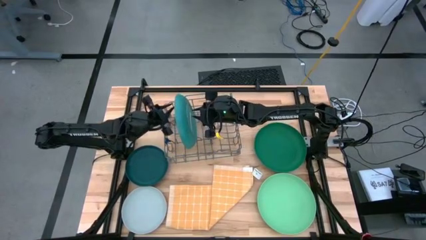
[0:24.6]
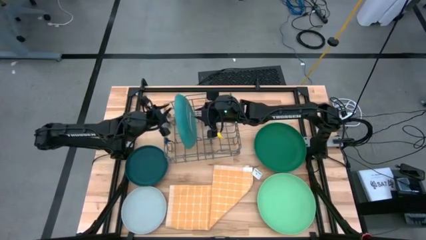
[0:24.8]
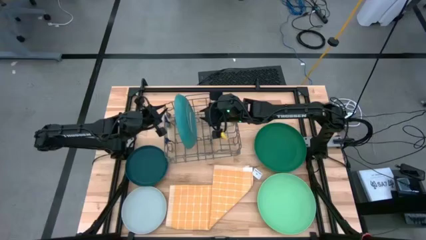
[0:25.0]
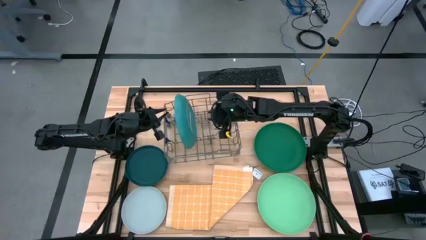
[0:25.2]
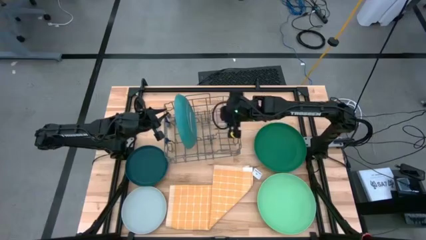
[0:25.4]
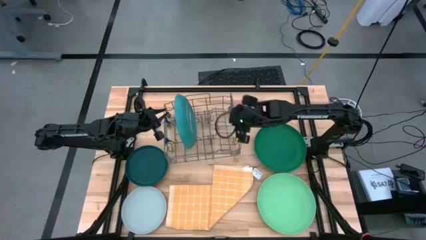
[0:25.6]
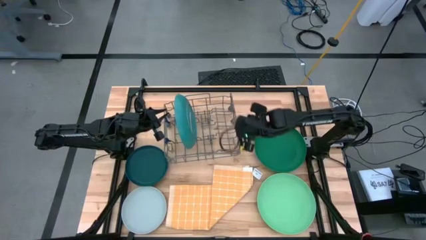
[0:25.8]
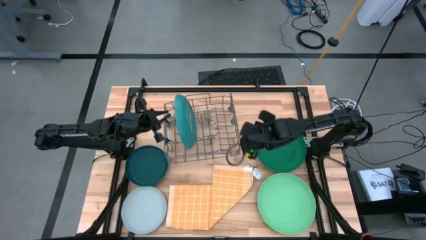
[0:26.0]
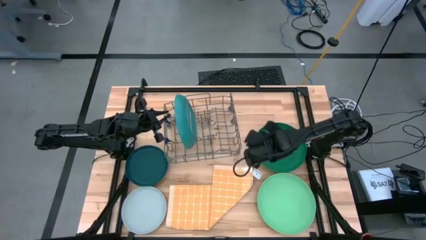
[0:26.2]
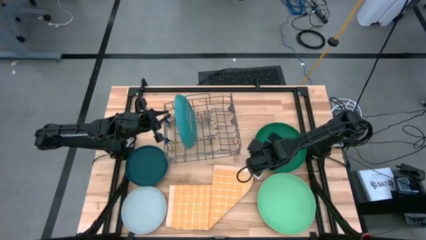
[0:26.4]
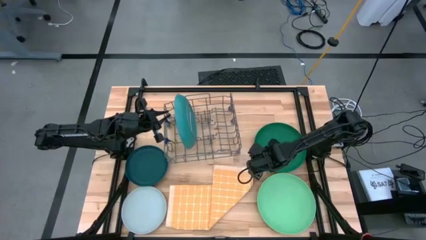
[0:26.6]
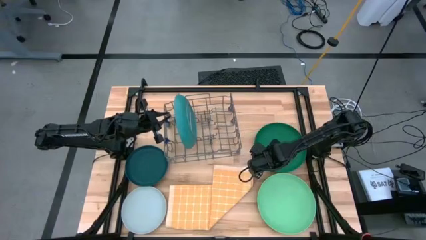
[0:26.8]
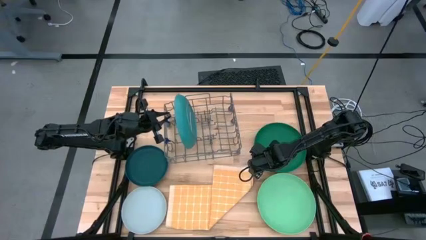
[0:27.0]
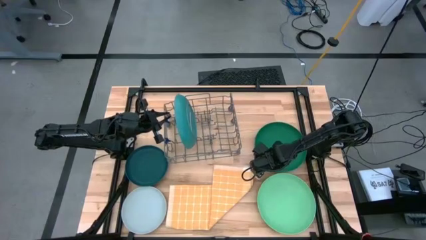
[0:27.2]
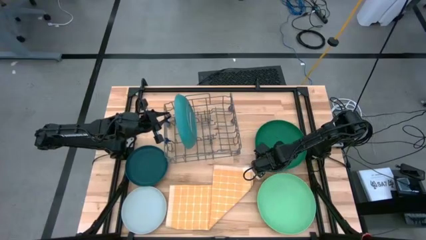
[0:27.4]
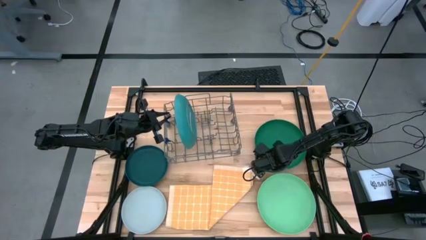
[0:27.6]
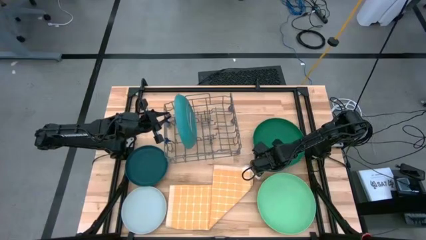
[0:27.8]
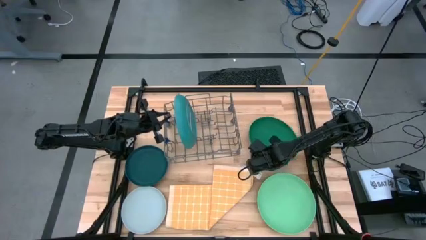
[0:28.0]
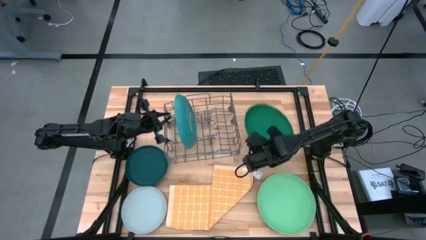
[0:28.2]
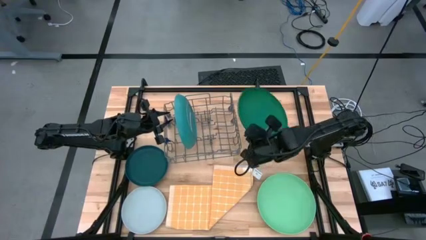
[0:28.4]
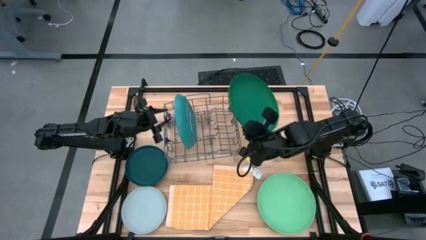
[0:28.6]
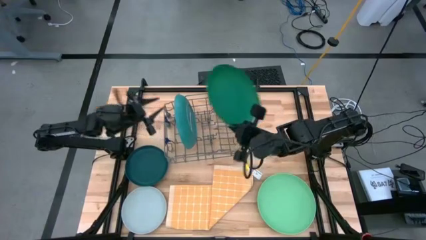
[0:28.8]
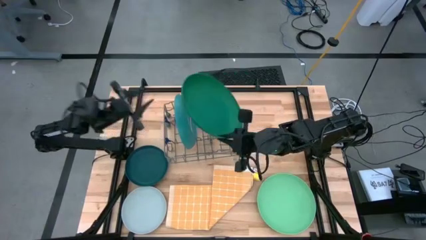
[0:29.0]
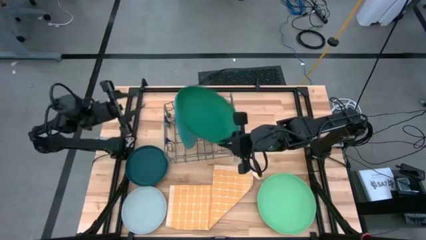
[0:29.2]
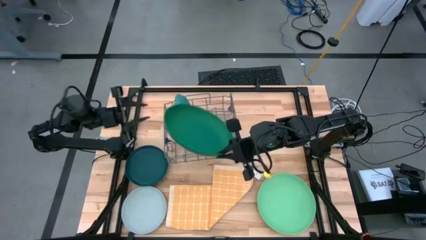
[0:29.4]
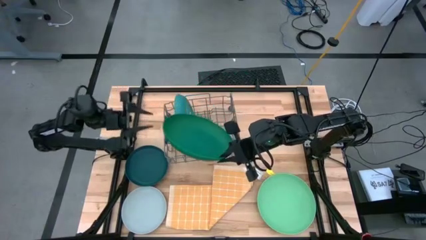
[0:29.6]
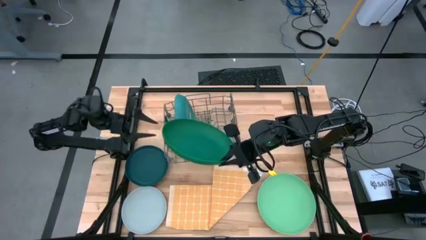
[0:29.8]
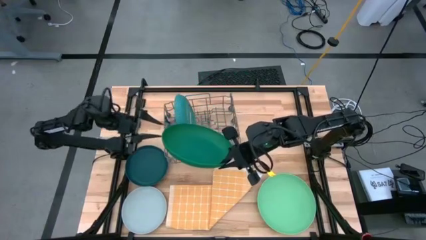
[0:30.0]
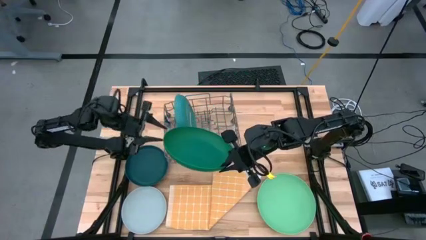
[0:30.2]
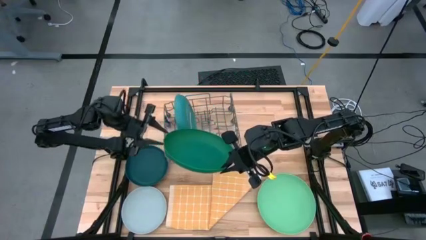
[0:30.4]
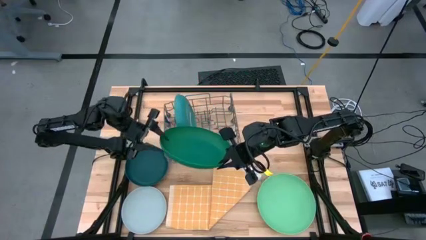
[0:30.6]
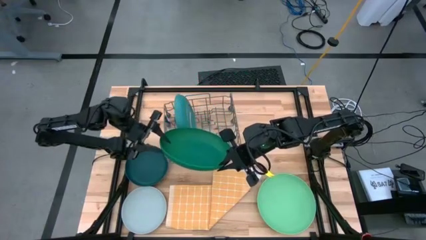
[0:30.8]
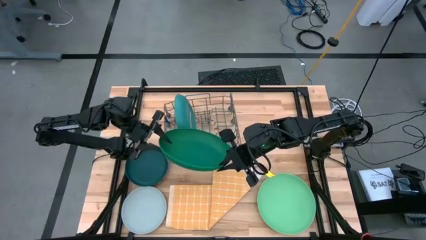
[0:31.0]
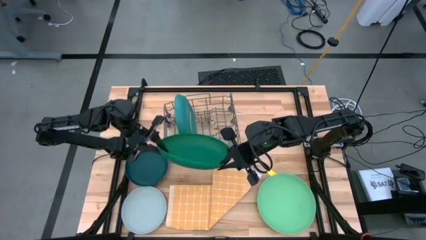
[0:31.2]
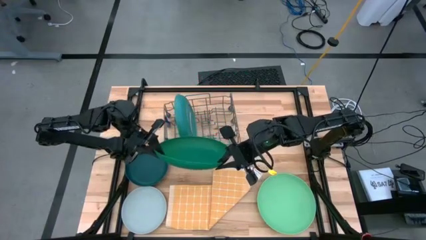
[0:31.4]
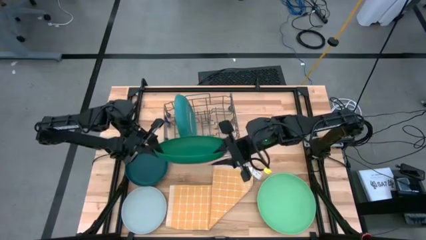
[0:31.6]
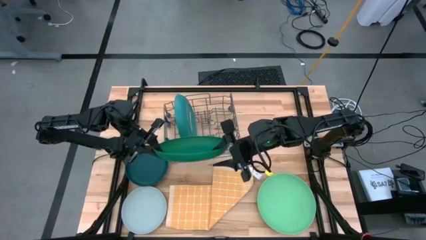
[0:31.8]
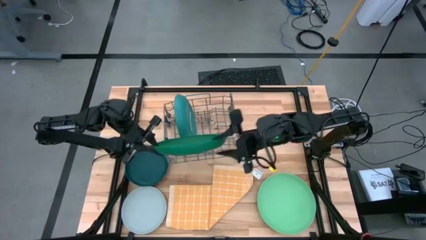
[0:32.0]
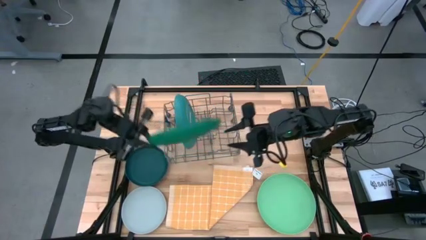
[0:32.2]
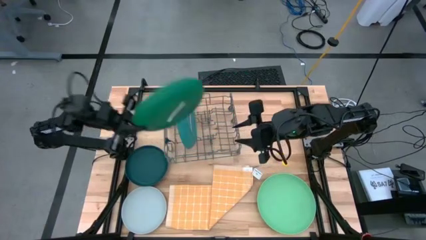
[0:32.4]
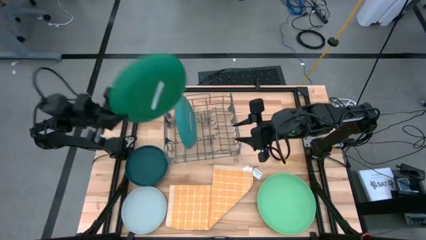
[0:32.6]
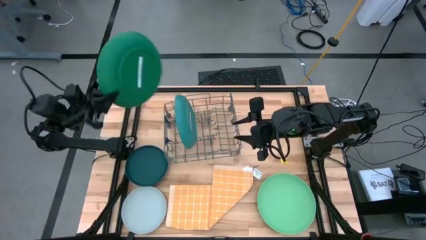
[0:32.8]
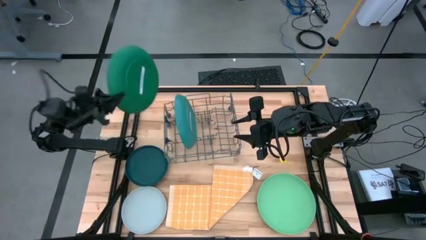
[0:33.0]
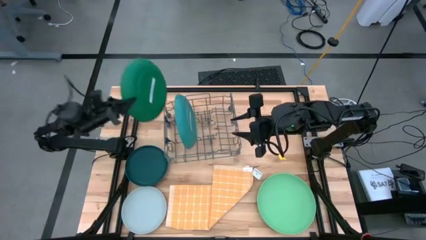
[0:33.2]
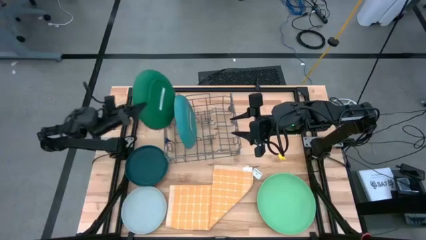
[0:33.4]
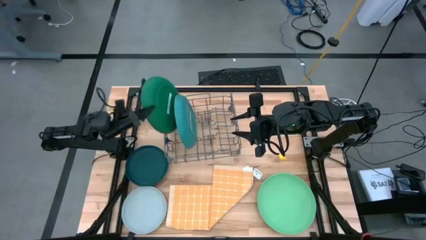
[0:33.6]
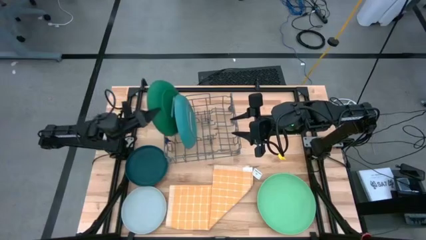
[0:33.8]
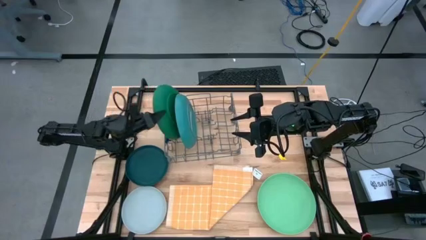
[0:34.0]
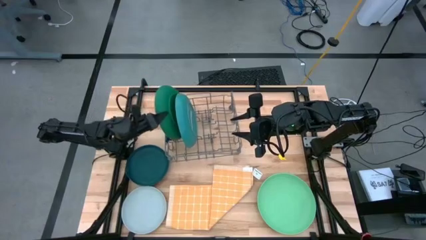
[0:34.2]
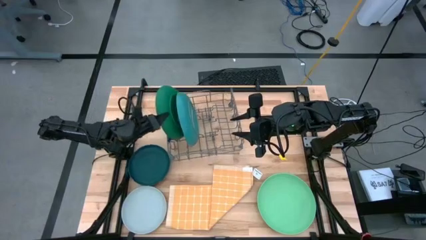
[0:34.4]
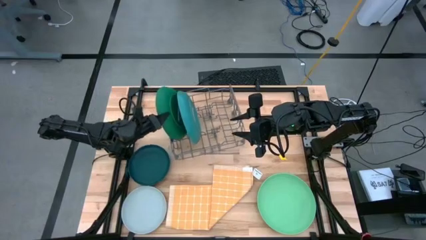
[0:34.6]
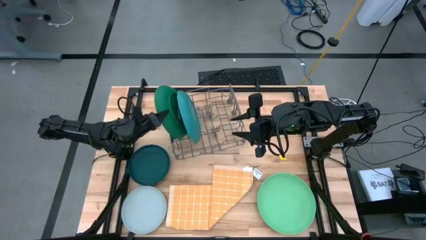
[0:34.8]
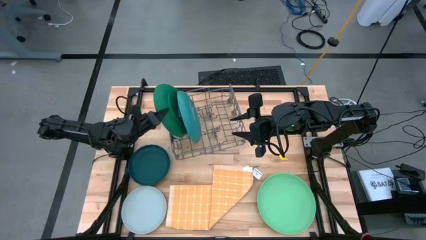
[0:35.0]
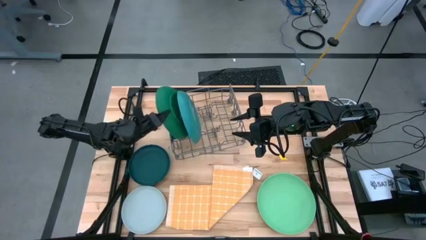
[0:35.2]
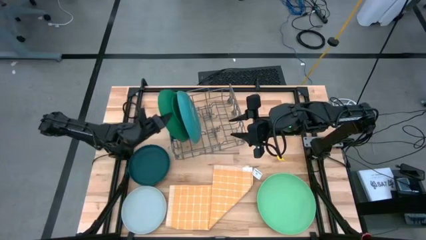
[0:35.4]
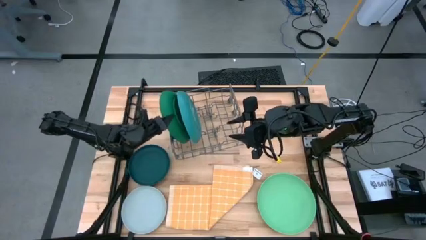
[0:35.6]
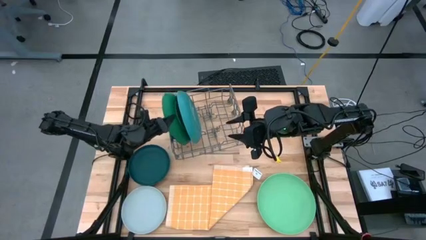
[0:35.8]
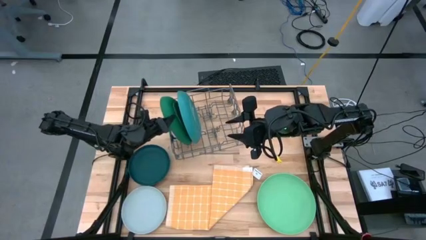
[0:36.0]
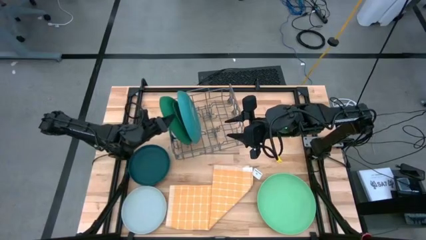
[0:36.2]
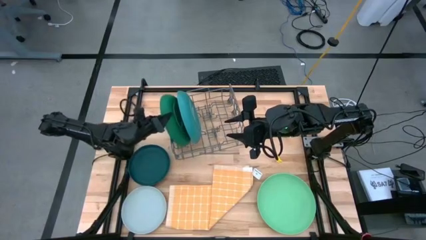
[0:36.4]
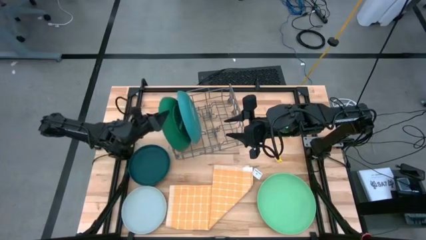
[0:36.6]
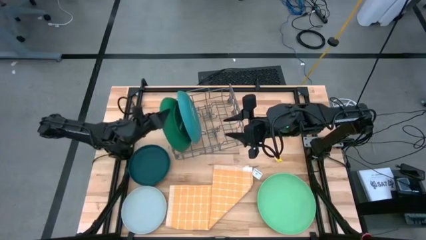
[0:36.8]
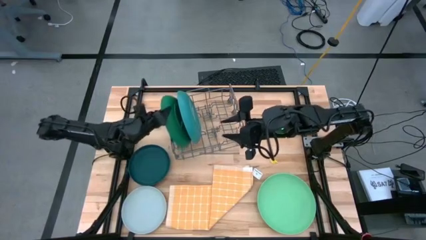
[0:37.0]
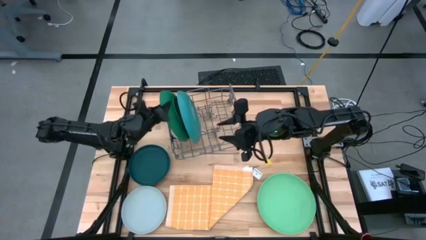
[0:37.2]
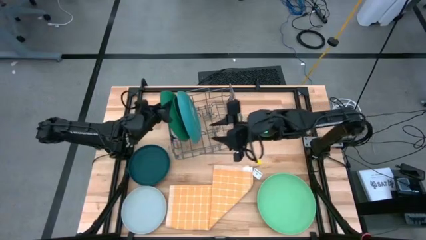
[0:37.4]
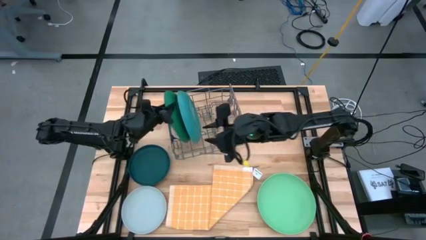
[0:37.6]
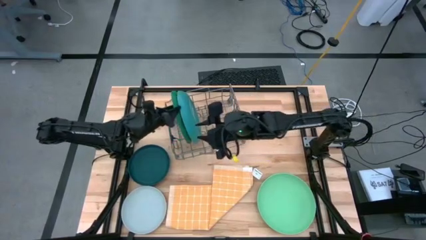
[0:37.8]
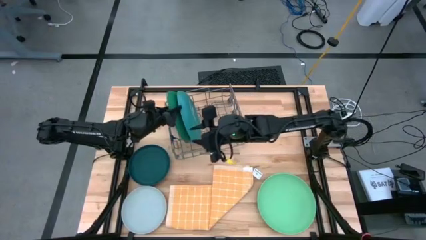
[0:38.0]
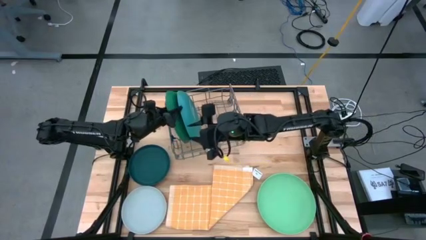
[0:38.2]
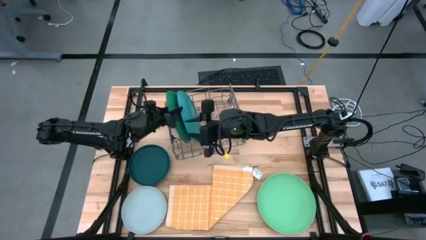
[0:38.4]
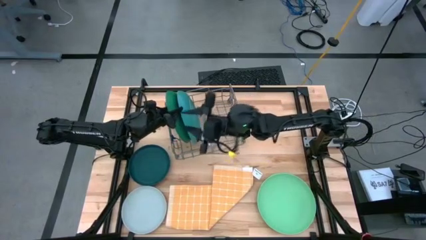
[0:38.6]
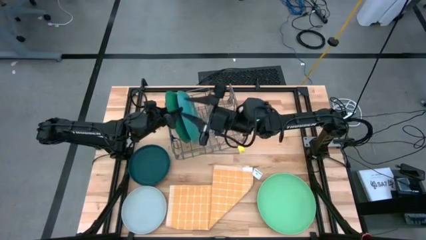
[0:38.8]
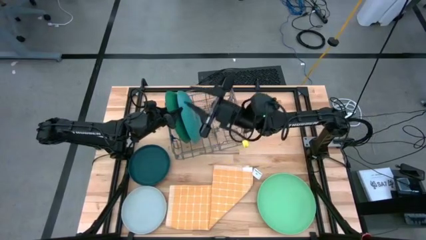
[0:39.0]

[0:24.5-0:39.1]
Task: Sort dishes
Put the green plate on the dish rack

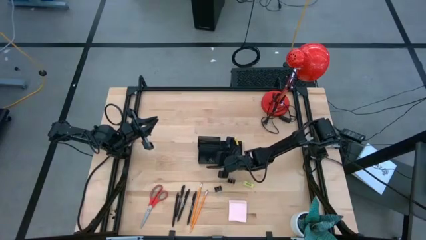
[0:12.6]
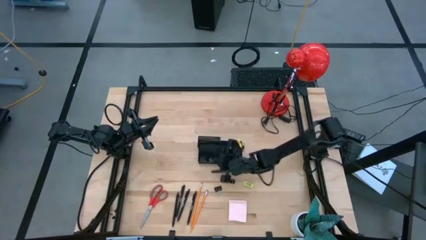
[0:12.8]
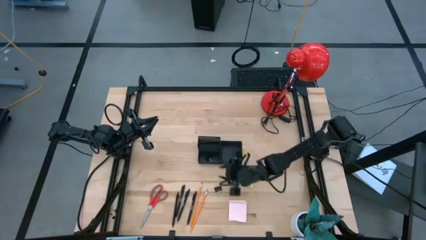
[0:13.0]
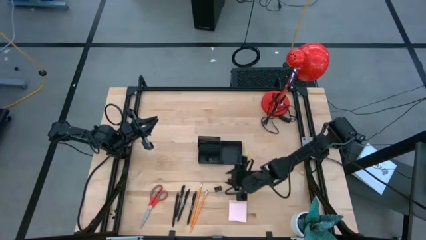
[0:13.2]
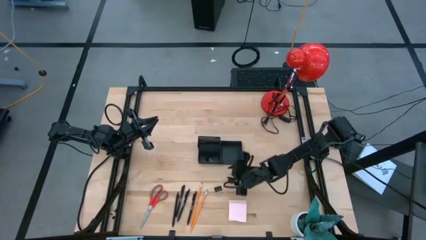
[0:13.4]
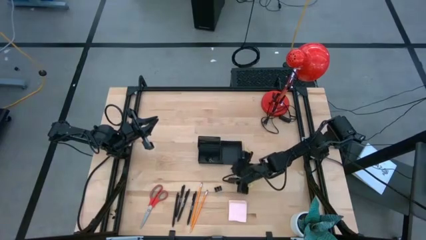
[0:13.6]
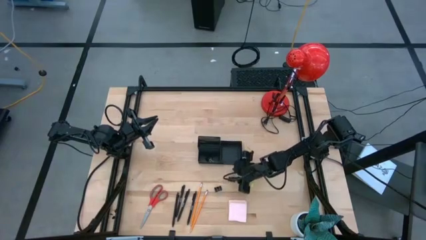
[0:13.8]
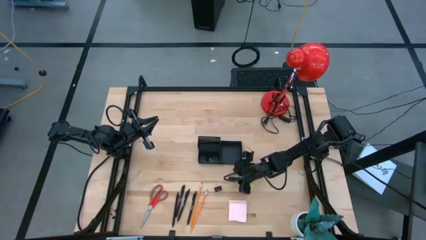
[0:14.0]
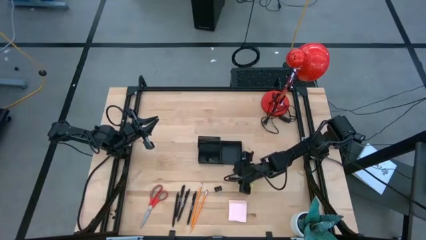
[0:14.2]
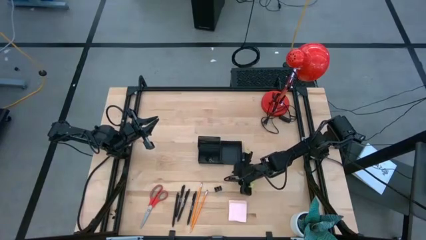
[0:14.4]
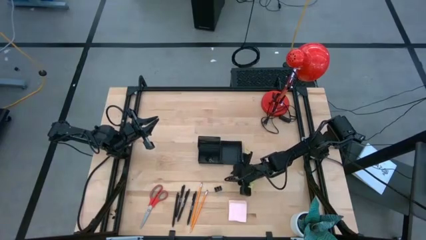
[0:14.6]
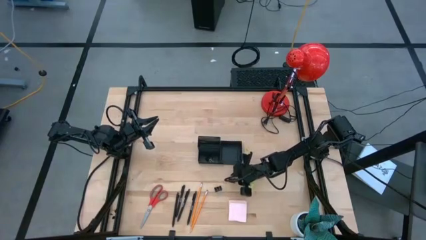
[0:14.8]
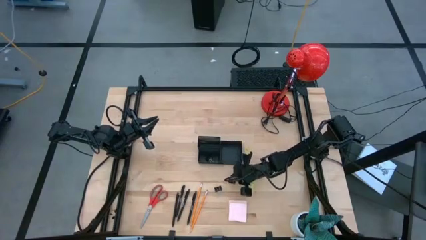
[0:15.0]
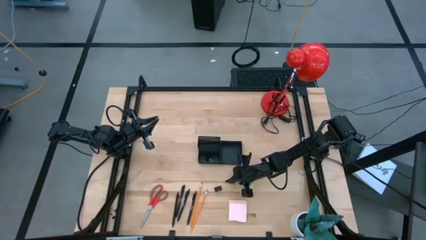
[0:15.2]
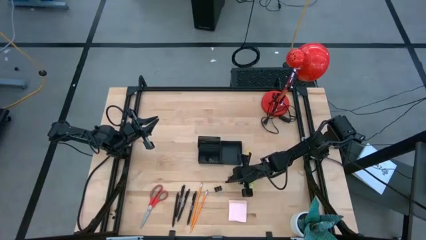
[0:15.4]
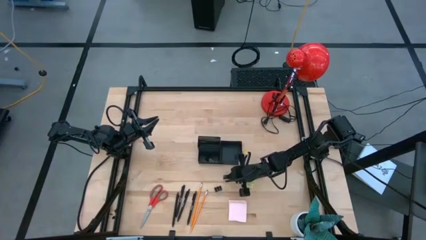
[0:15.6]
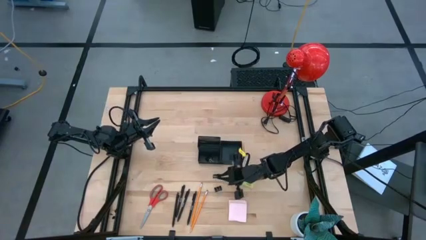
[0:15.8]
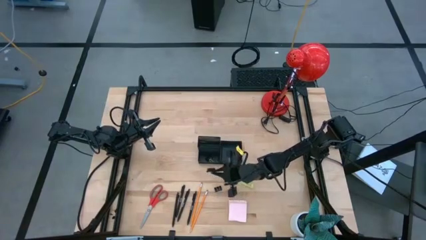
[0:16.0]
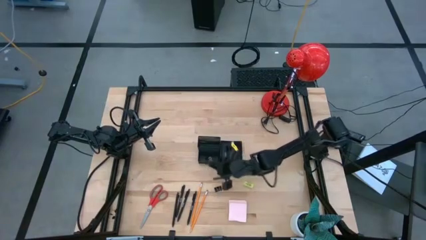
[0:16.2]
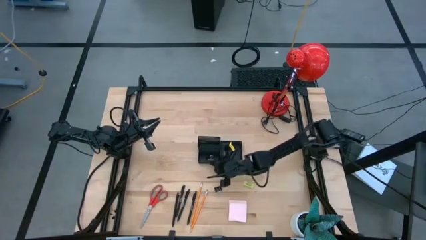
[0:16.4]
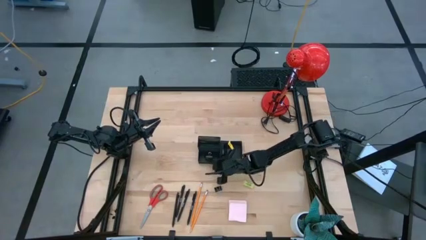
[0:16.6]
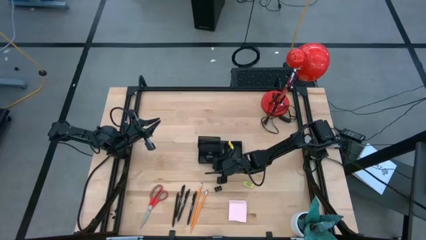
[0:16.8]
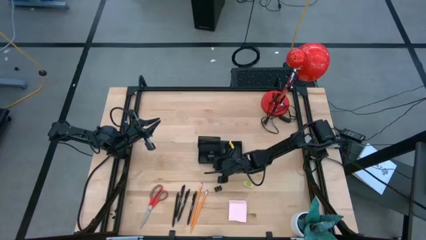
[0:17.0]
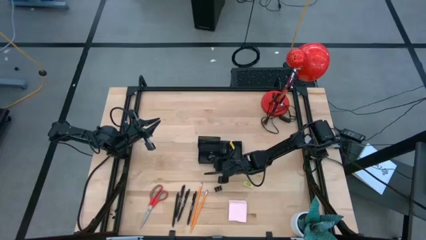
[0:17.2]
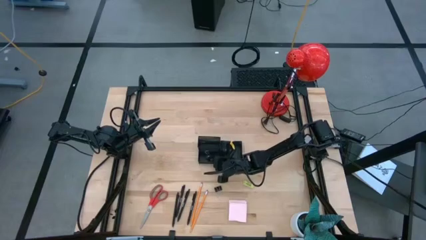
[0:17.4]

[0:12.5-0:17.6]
Task: Pick and place office supplies into organizer
Put the black binder clip into the black desk organizer
